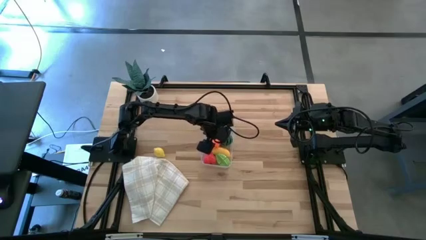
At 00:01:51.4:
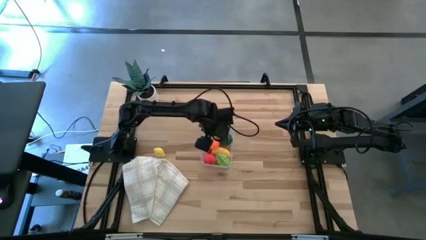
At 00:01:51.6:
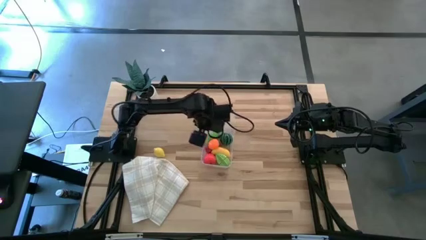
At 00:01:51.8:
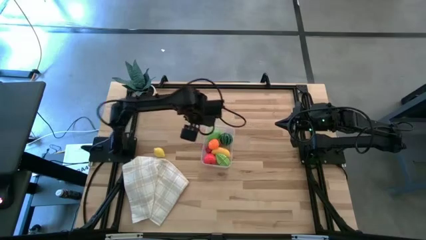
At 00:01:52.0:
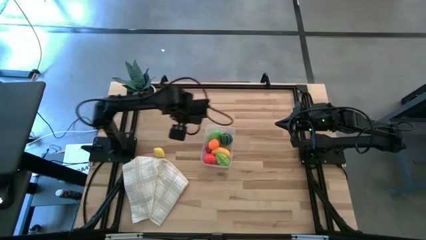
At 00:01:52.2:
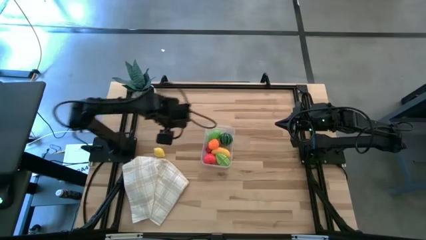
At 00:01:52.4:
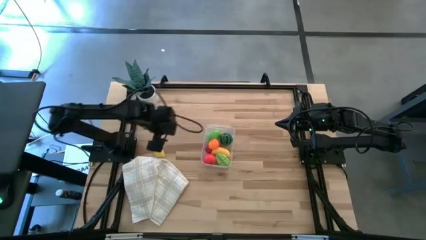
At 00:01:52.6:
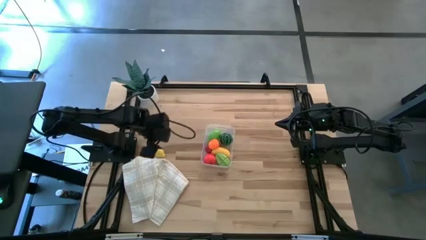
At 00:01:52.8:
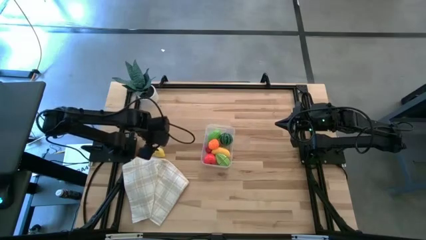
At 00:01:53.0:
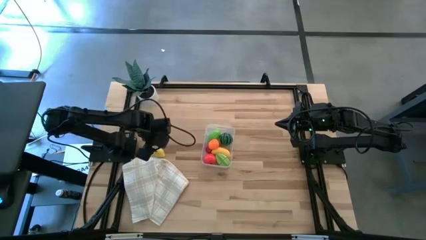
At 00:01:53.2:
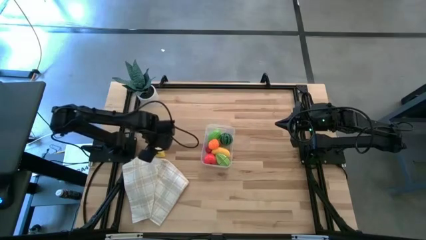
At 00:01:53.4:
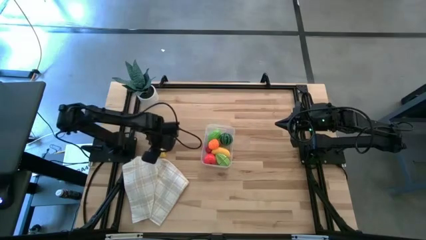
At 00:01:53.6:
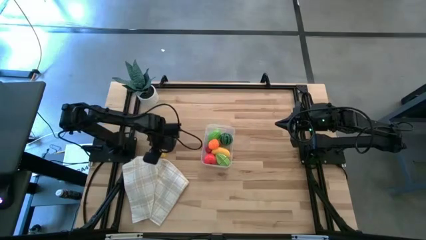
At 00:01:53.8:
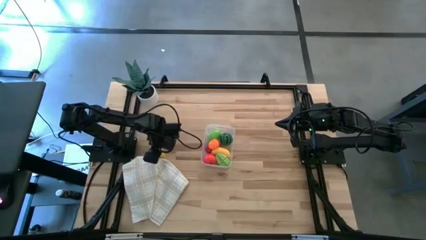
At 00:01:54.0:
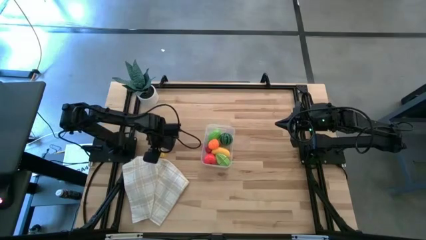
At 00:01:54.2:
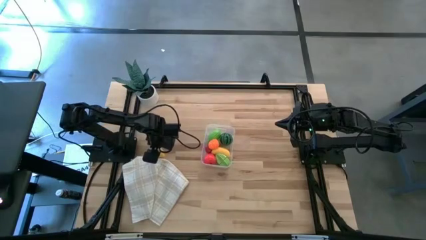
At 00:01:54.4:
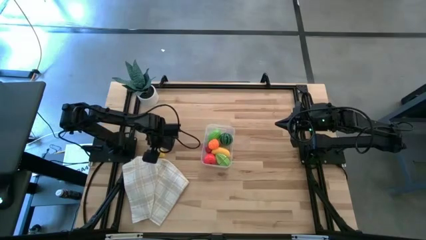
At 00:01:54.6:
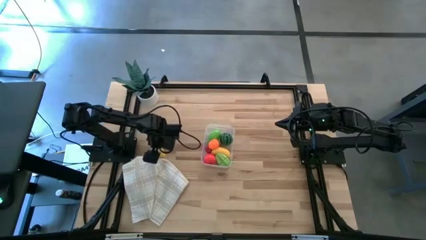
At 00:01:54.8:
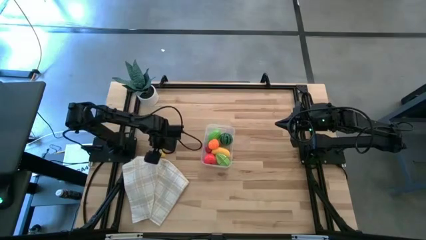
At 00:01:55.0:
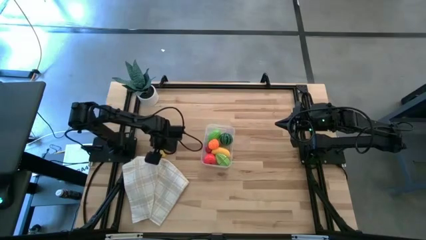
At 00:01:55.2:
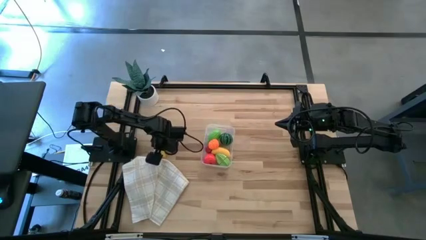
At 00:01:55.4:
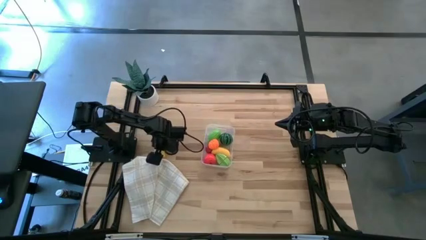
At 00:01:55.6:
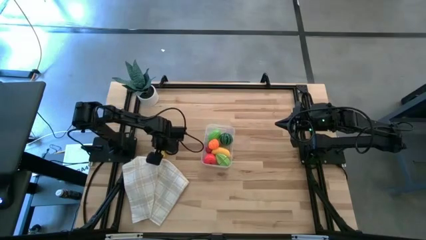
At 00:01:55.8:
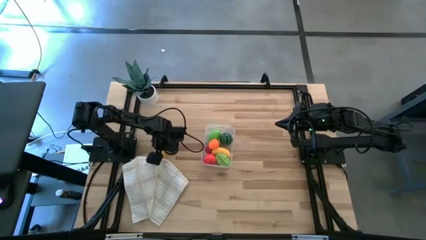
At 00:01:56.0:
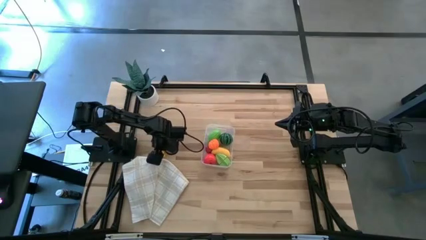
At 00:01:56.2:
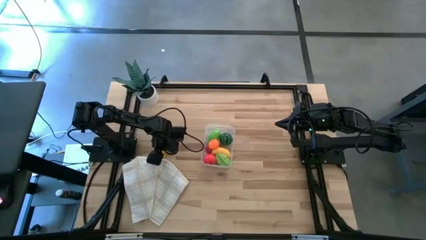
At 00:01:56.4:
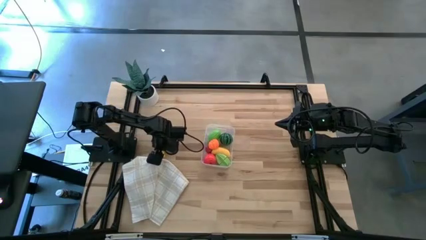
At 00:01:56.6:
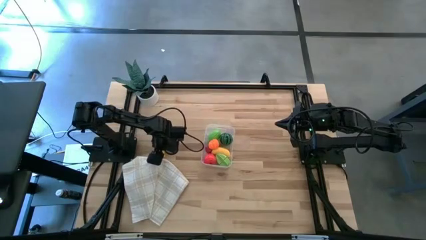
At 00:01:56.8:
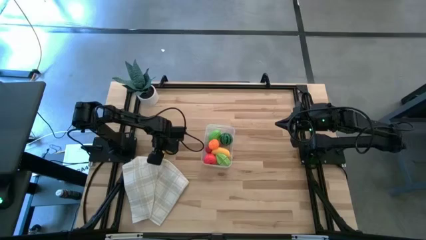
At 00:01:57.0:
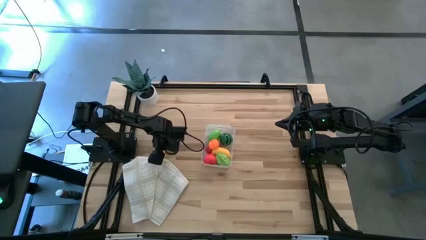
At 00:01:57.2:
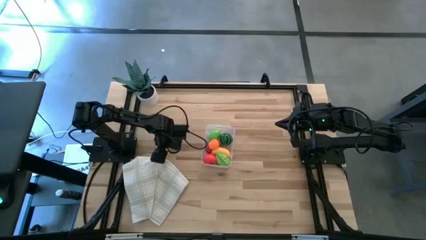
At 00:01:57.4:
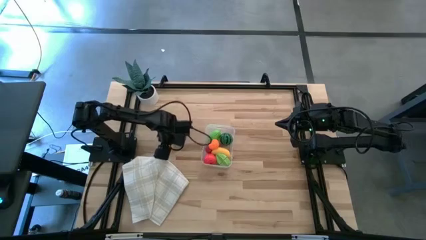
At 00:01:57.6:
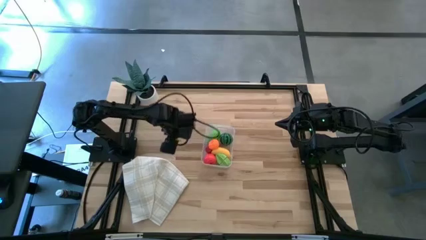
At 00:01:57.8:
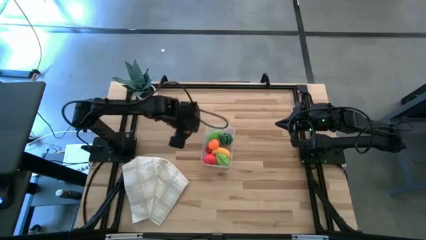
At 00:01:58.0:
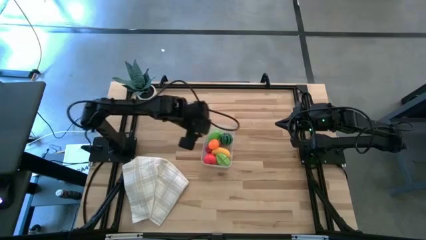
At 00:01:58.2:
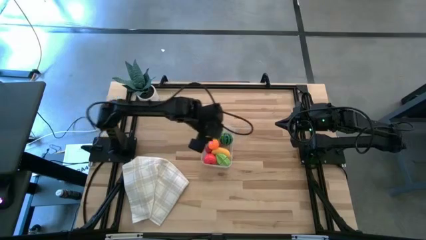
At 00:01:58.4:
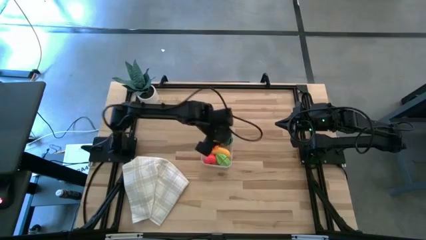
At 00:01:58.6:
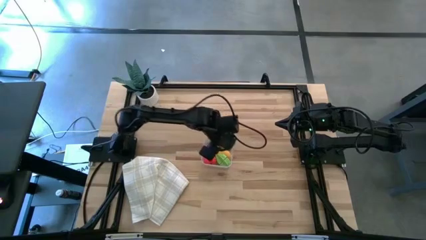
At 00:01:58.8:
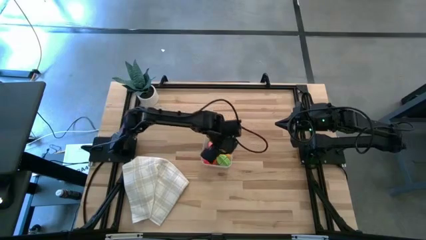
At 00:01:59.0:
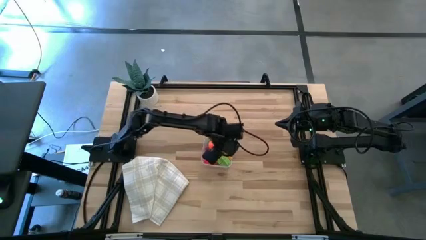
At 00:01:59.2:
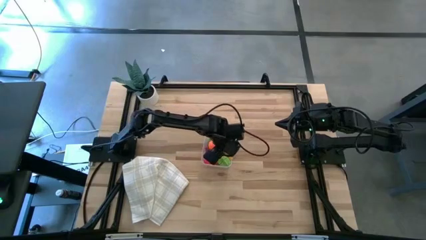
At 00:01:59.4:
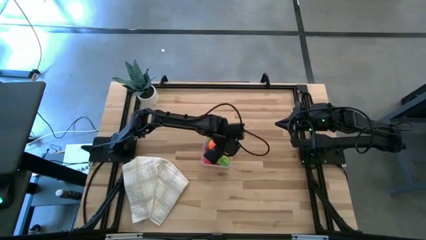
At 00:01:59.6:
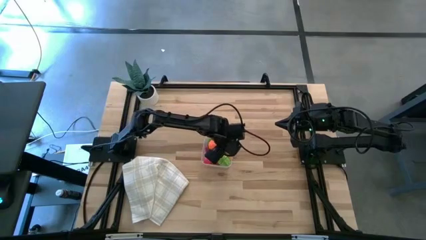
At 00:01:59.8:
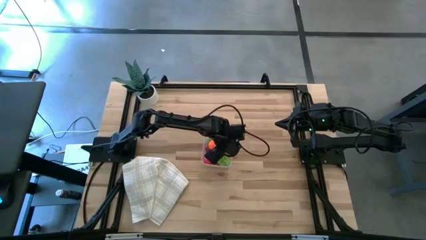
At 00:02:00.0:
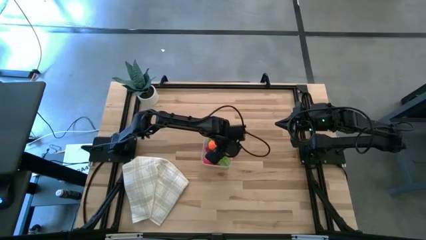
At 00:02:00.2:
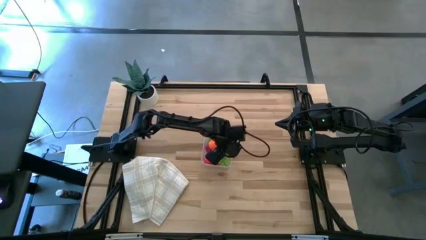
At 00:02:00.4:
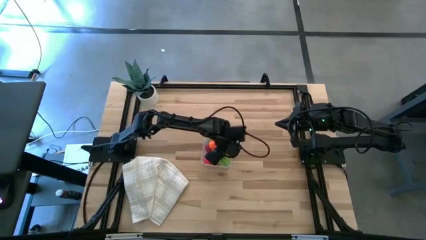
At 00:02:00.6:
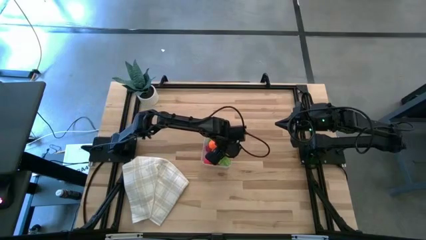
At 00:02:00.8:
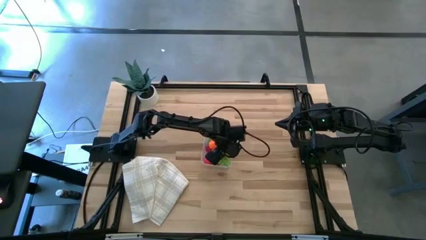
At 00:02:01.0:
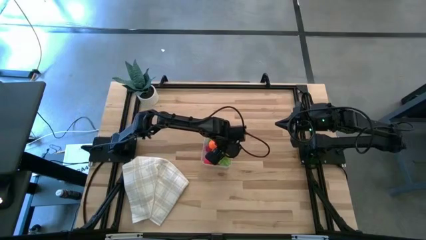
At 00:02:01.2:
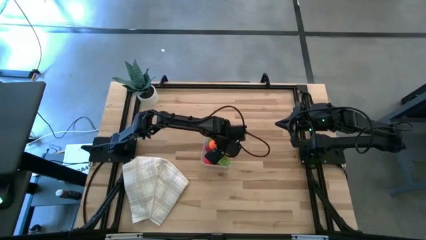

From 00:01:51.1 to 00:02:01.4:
Task: Pick and placing Produce into tupperware
Put the lemon into the transparent bin

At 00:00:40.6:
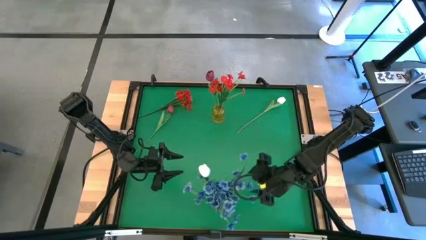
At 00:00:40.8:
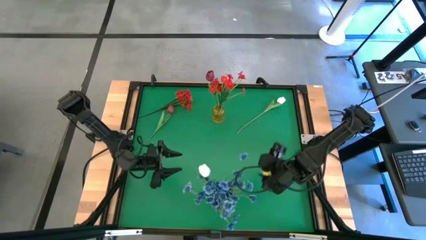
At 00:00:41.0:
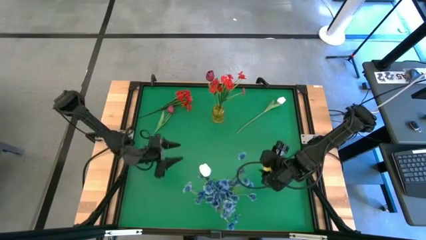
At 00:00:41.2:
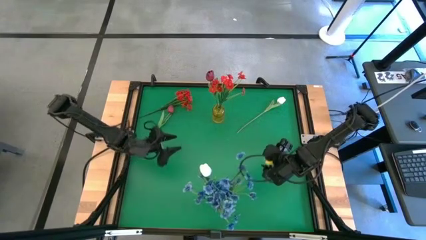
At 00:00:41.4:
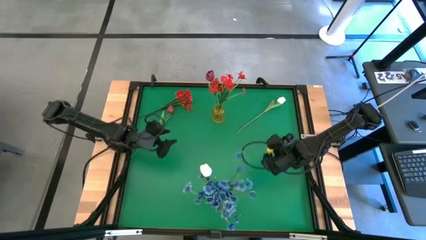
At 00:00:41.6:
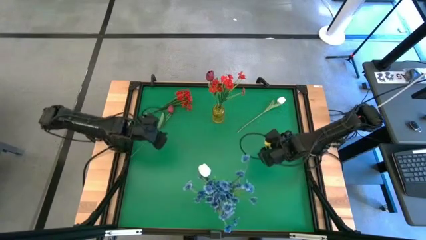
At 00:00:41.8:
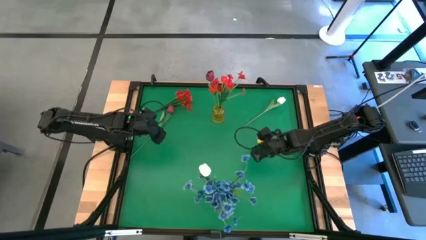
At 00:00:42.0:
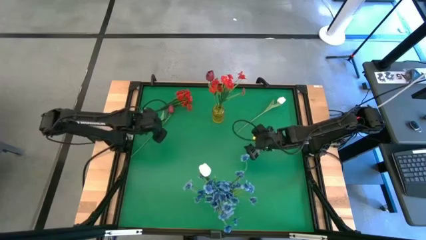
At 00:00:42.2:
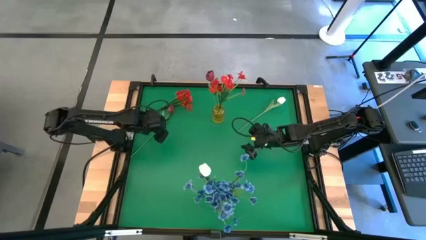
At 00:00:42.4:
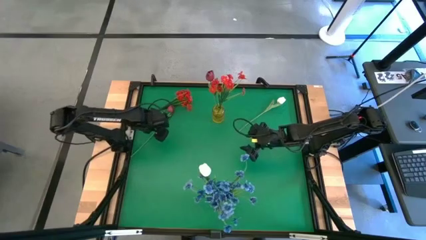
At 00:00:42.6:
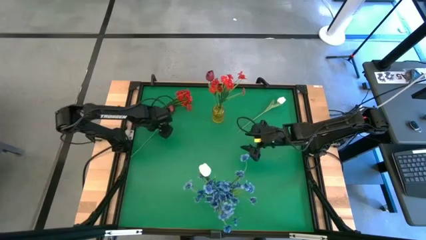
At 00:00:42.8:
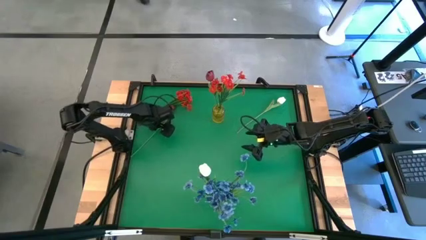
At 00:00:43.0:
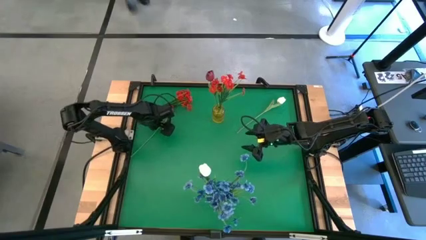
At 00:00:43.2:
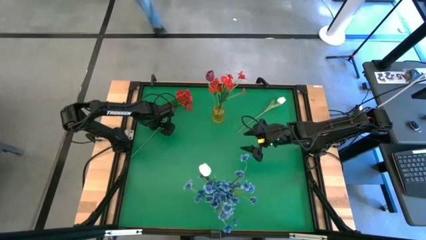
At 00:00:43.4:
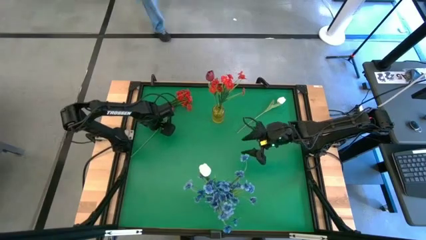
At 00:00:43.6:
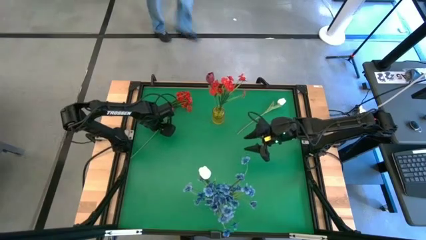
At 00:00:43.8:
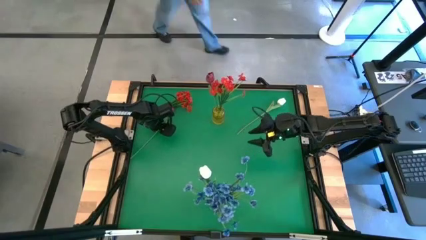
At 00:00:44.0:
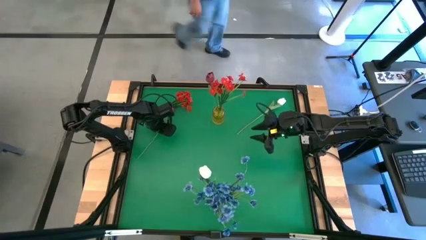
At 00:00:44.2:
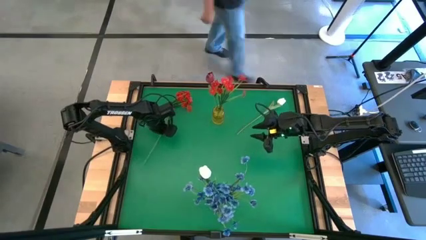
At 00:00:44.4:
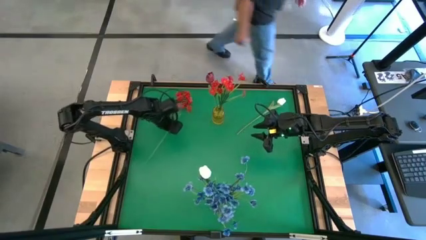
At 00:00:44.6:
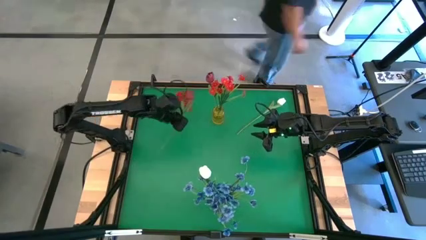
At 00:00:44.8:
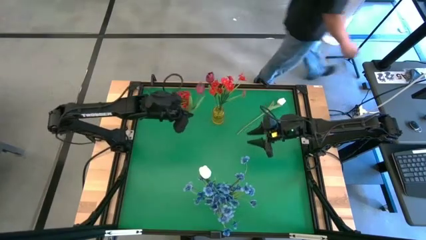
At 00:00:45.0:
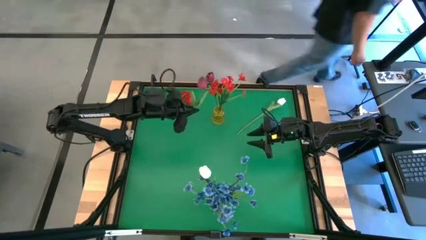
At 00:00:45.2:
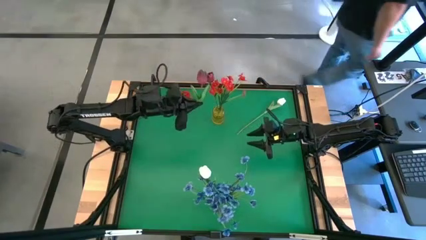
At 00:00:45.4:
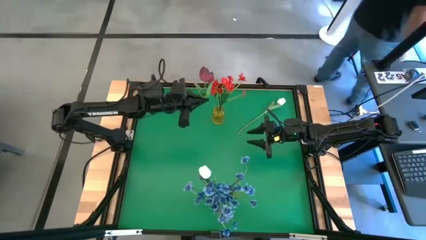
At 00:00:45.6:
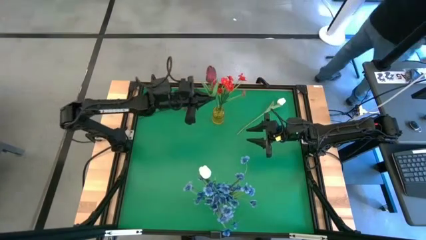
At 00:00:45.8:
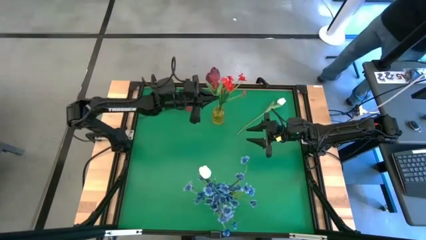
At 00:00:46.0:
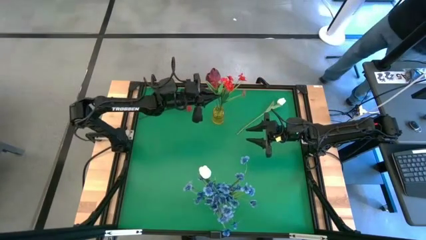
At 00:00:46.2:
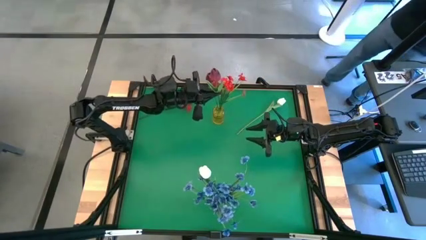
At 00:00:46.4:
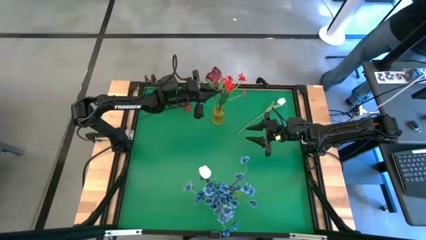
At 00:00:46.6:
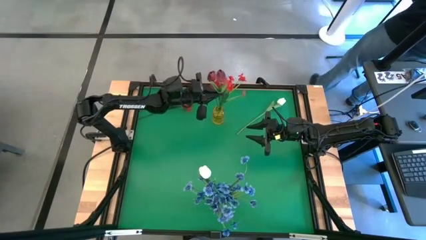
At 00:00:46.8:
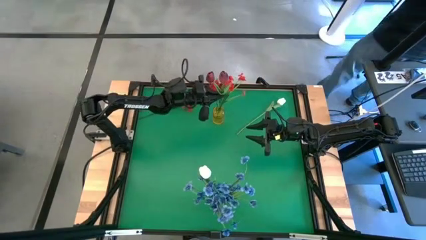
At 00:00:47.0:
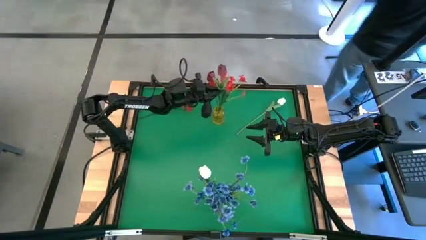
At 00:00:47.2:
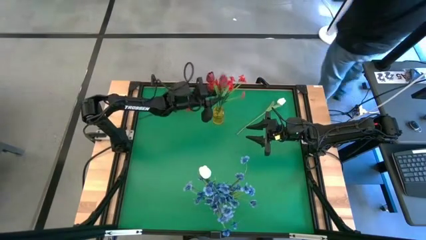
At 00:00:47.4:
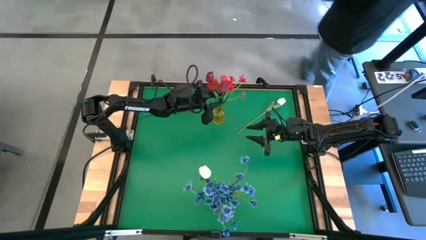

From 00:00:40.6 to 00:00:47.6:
Task: Sort flowers into vase by color
Put the red tulip into the yellow vase
